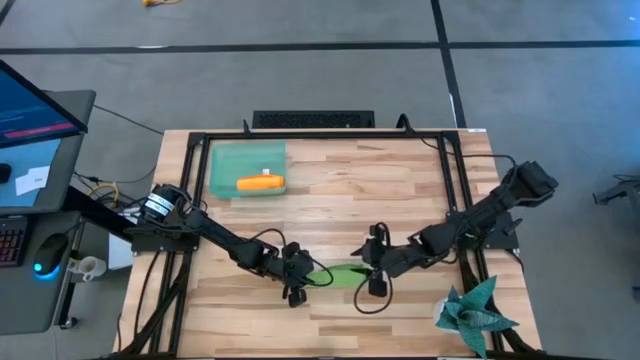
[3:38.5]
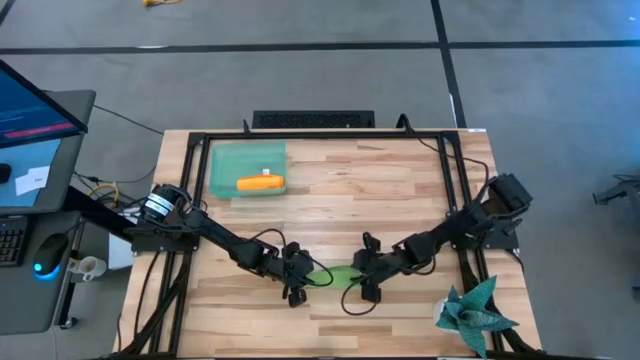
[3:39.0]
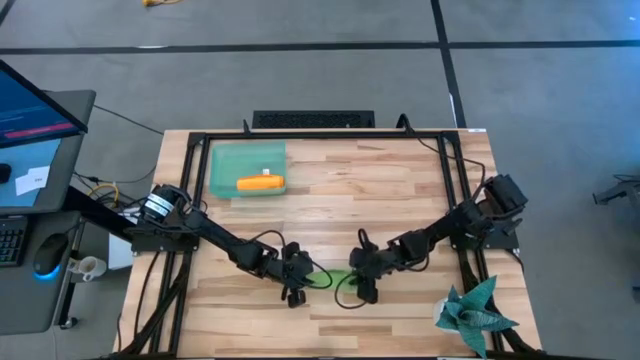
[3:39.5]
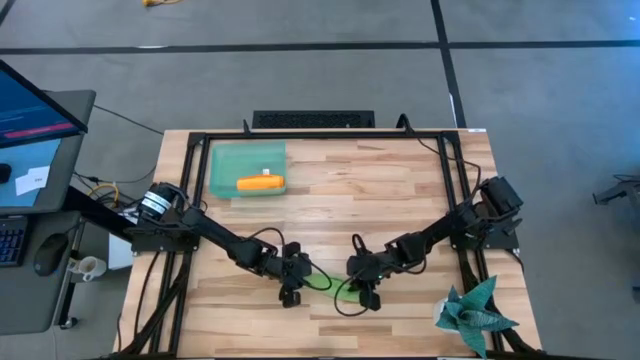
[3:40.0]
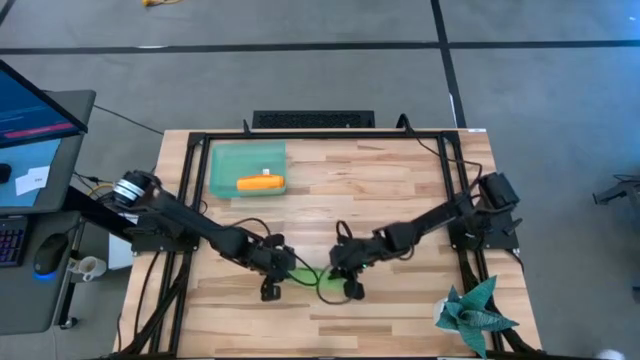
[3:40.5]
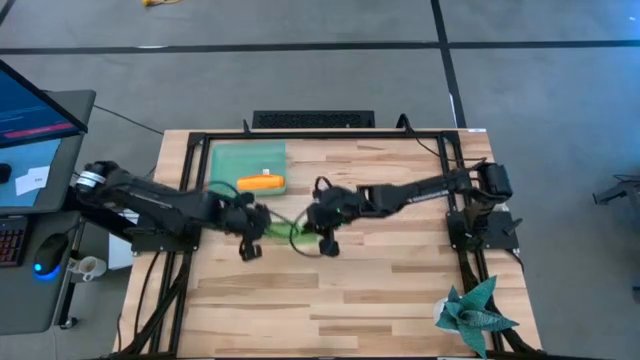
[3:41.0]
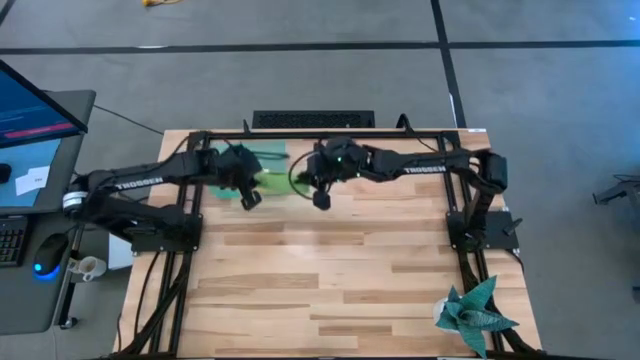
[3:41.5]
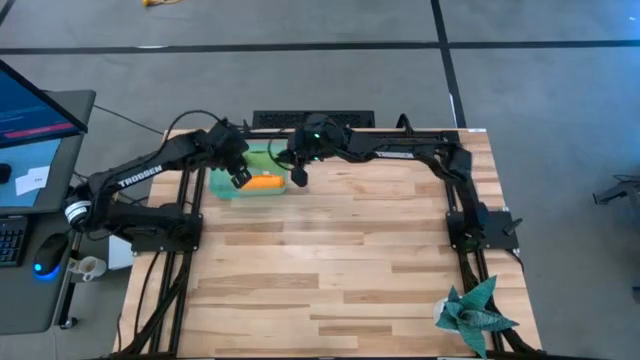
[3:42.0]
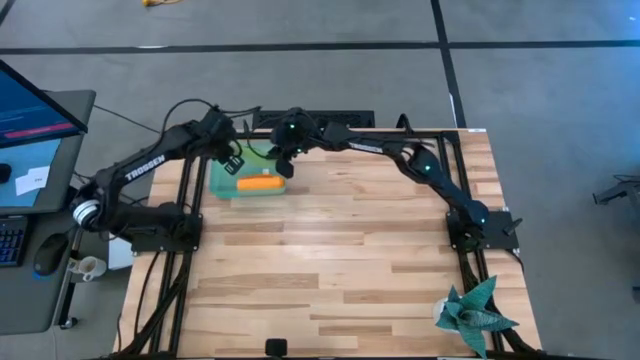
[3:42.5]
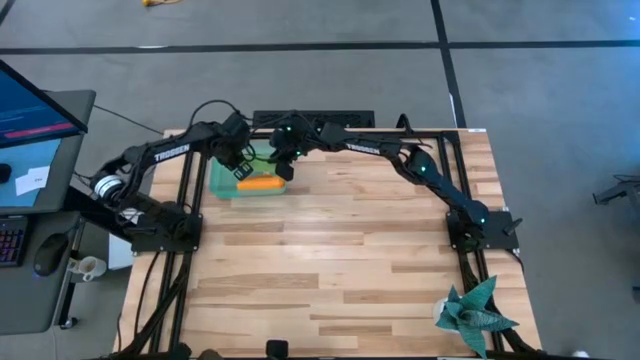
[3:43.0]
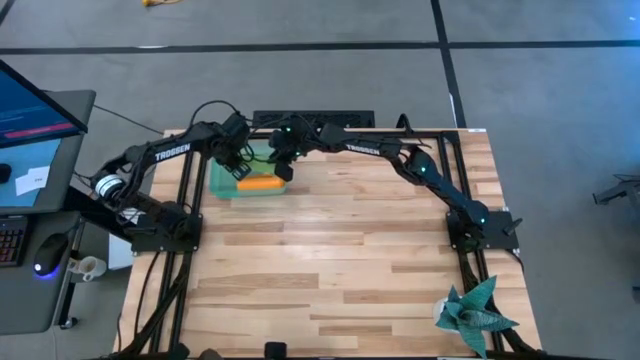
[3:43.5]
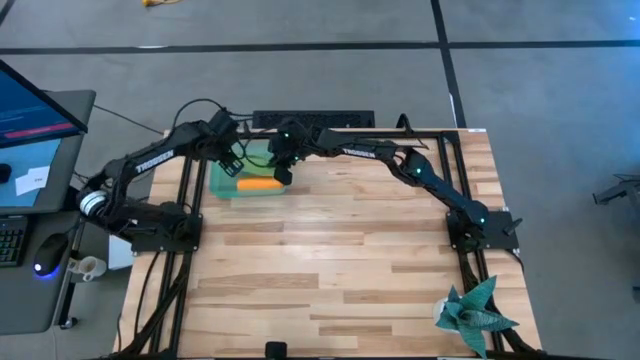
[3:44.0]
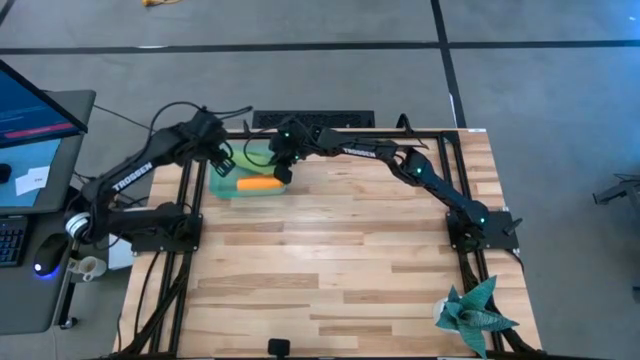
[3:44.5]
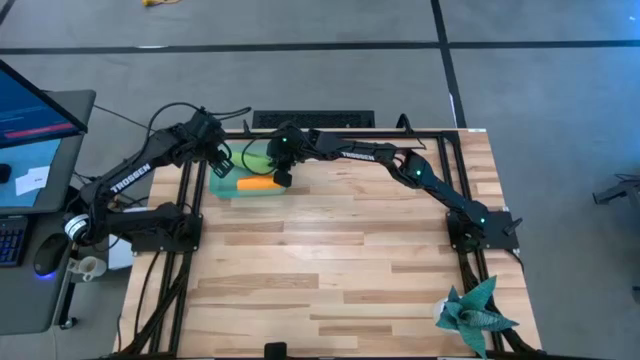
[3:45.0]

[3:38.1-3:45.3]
Task: Roll microfiber towels into tight, uniform cylinder then place into a basket
Put the rolled green microfiber cloth into the bin

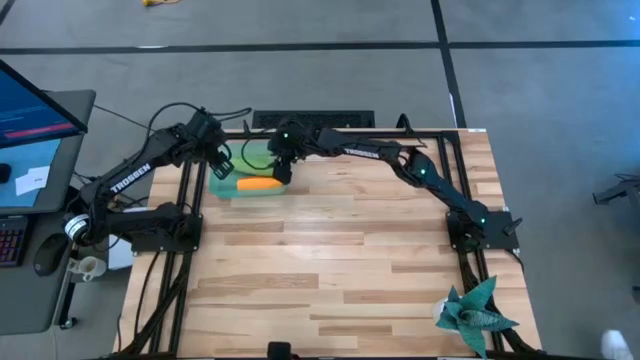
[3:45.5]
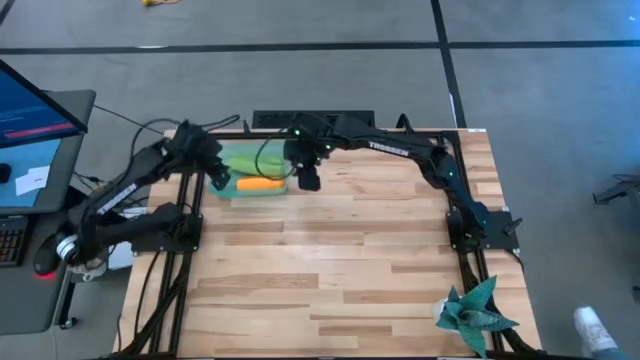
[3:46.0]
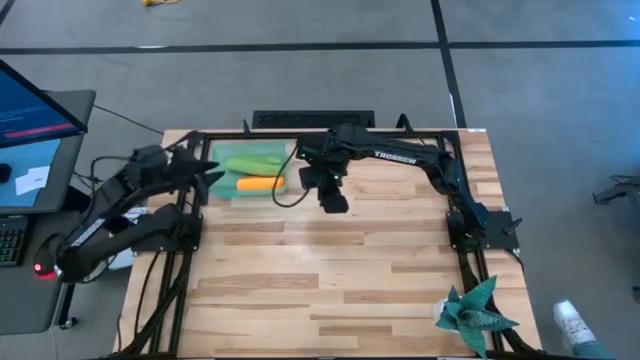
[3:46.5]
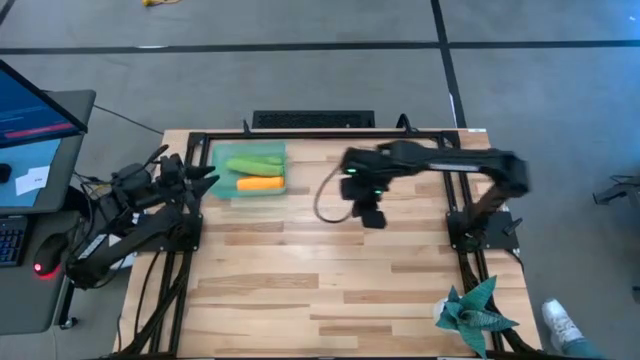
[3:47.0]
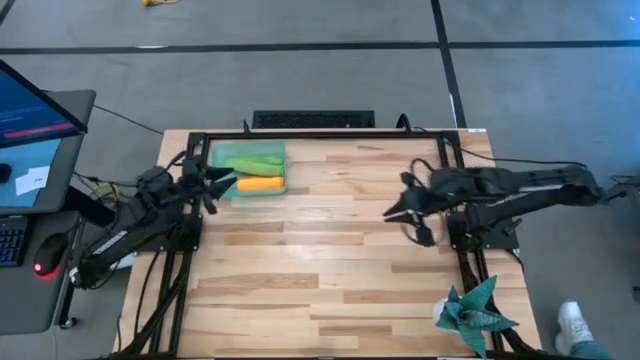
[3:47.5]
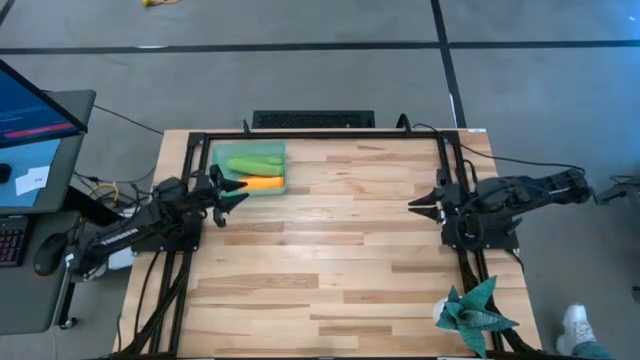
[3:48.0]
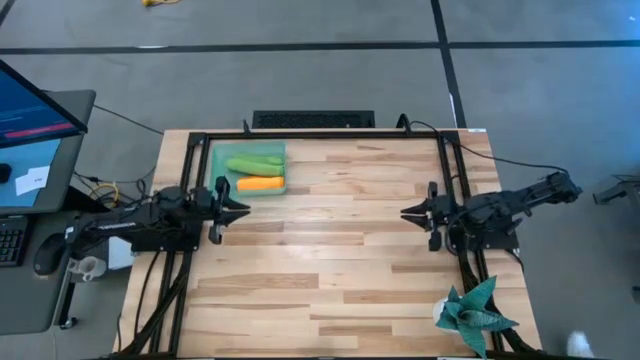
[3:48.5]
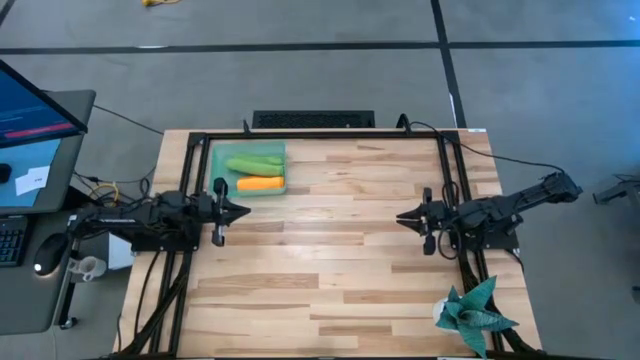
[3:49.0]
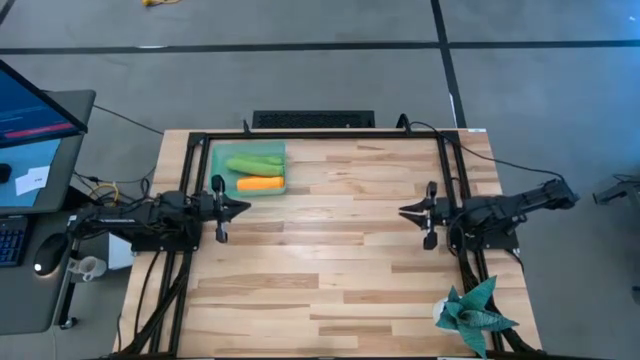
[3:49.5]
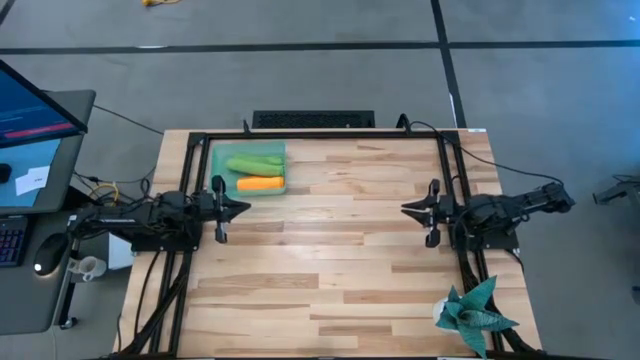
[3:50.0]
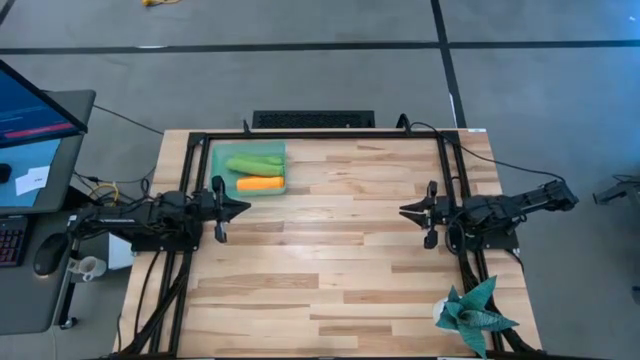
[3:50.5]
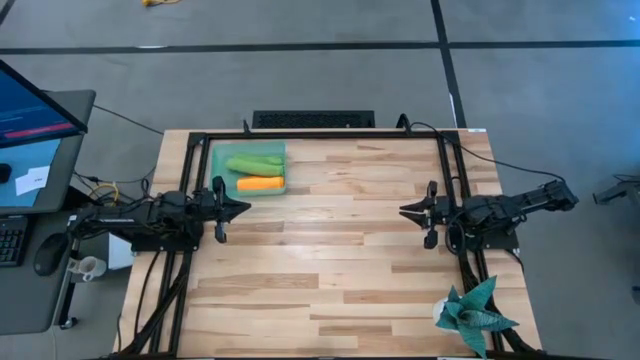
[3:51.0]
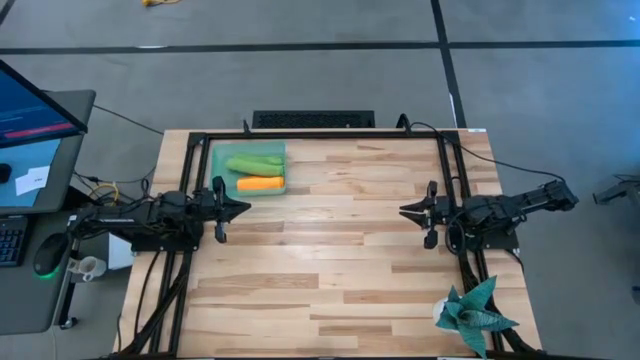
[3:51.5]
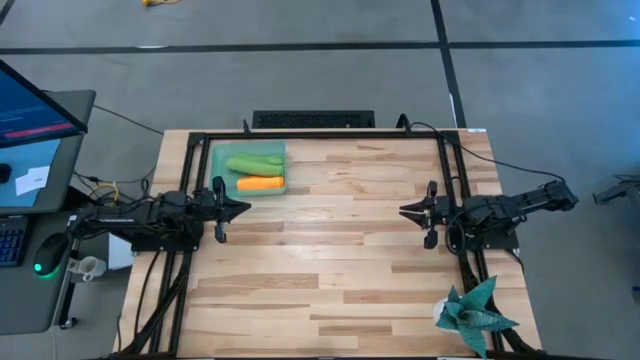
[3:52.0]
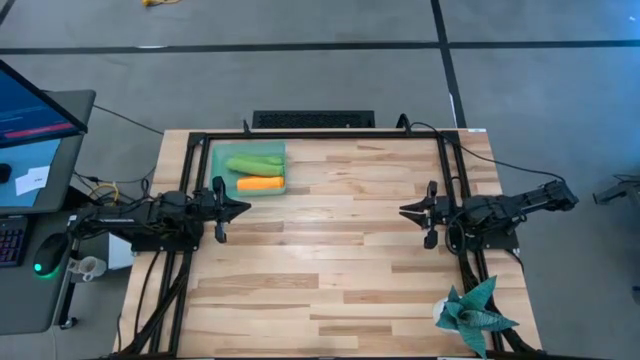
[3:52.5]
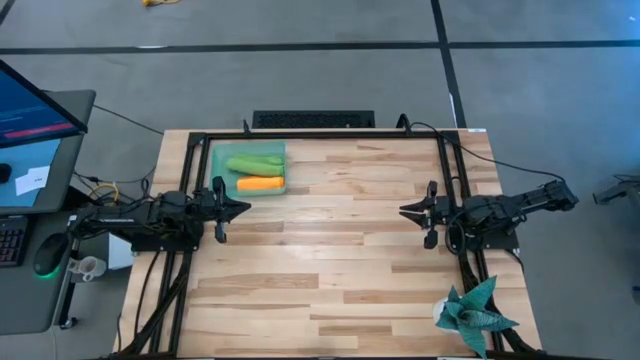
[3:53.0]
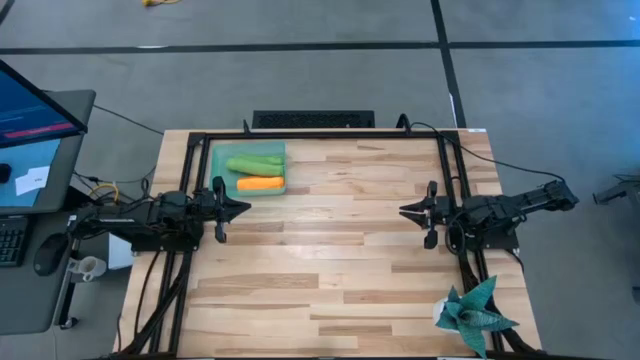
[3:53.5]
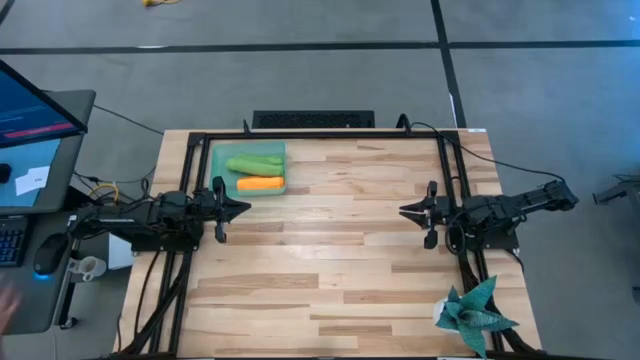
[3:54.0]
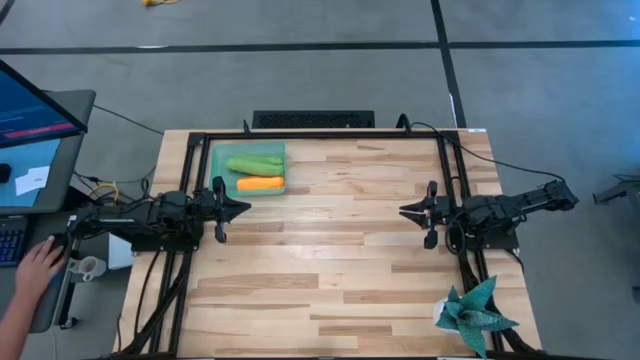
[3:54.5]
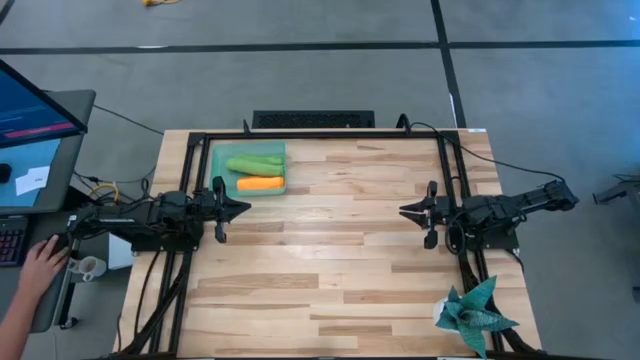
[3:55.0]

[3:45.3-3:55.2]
Return to Home Position

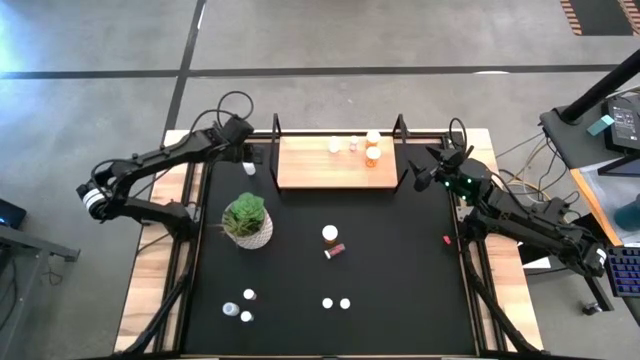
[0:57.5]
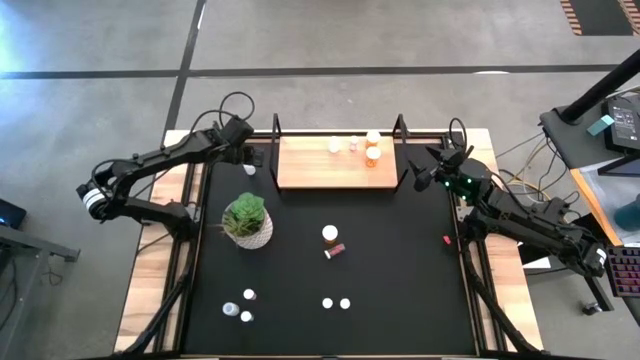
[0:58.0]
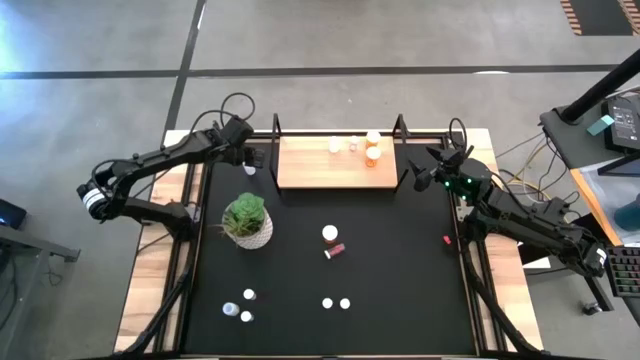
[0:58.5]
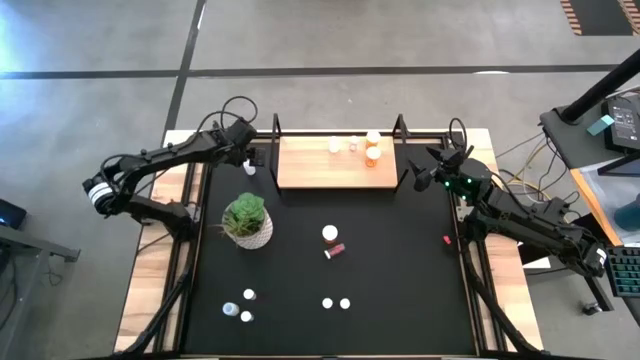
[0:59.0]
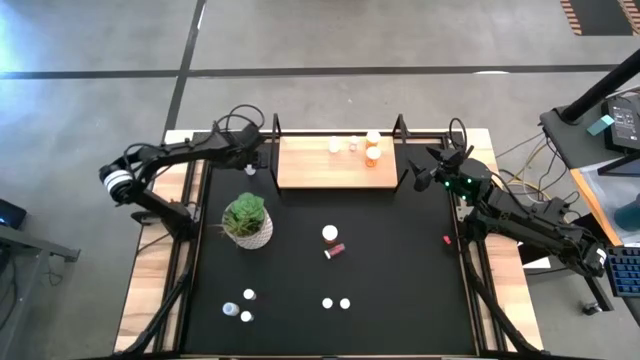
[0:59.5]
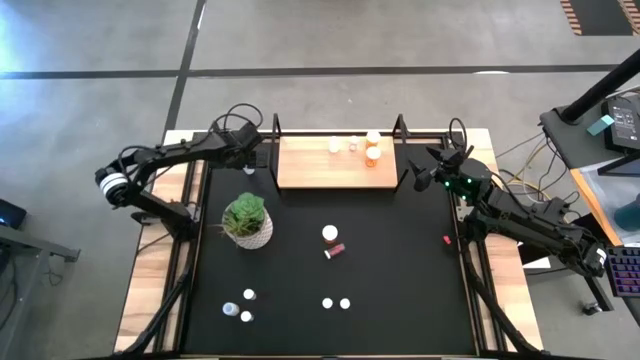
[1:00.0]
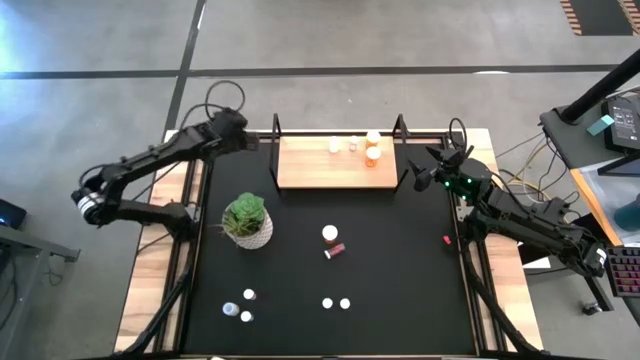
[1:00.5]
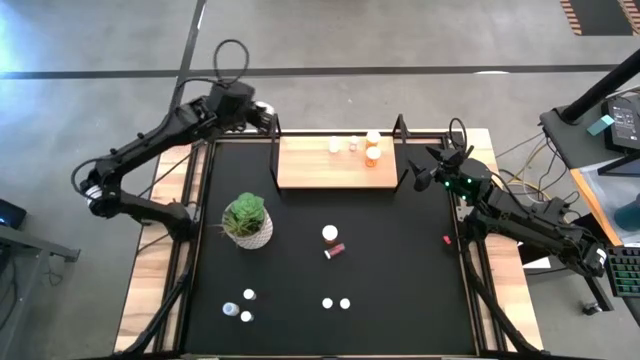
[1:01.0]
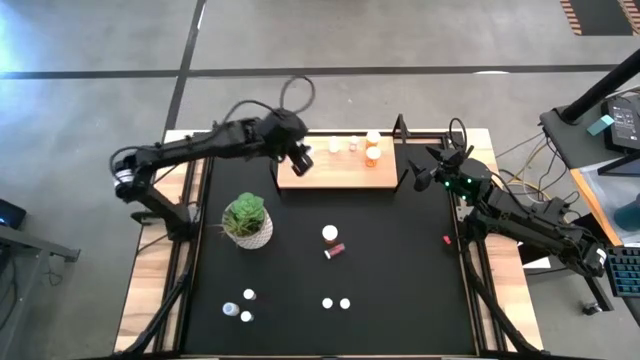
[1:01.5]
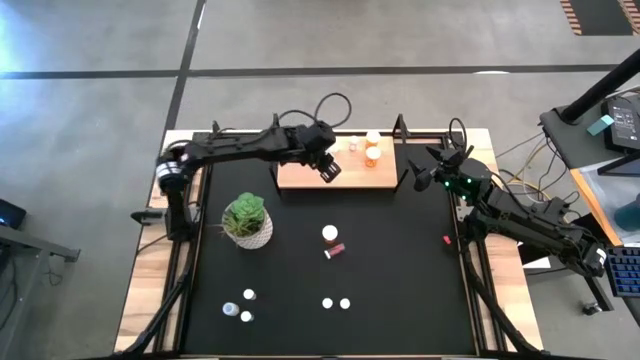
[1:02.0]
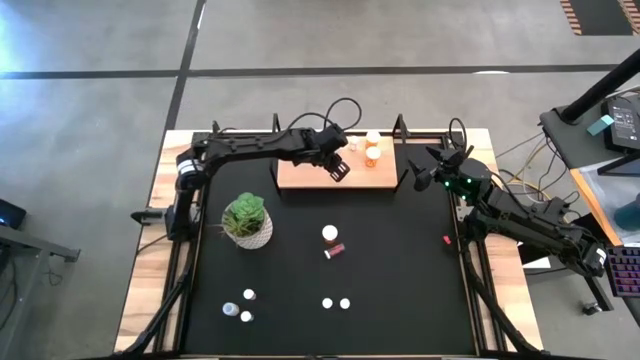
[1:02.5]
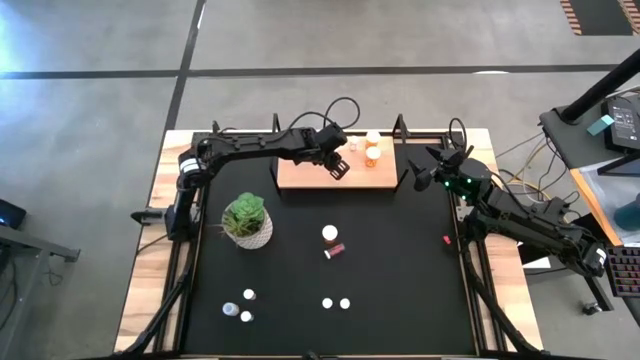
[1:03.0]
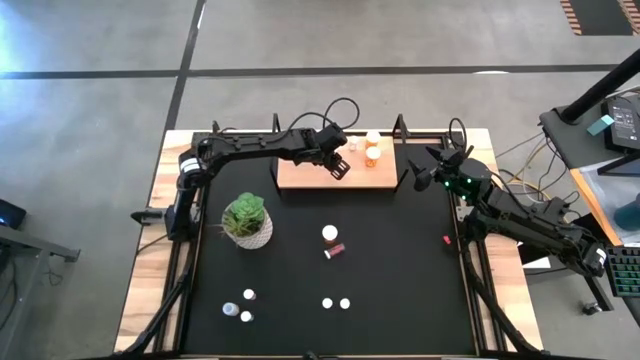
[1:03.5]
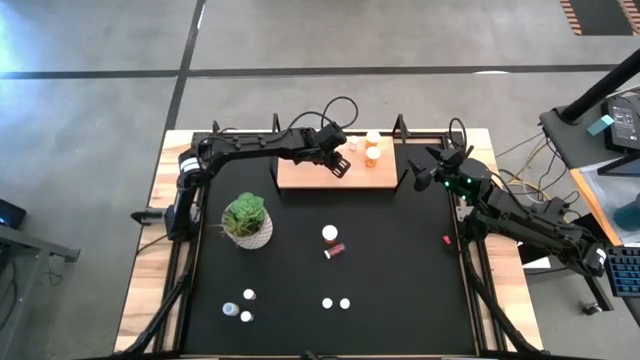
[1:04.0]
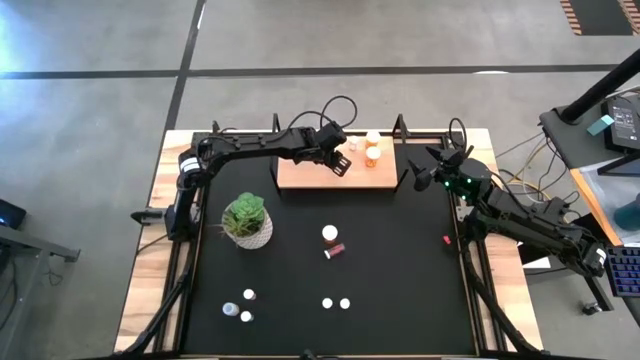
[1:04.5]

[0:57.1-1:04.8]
Task: Pick and place medicine bottles onto shelf by color
Put the top white pill bottle on the shelf aligned with the other white pill bottle
